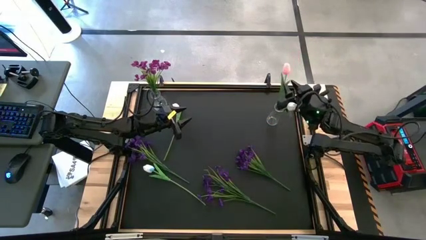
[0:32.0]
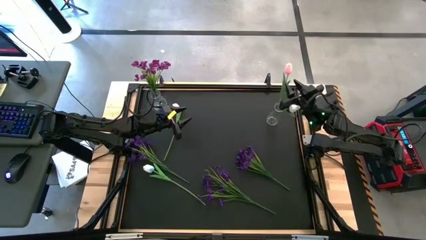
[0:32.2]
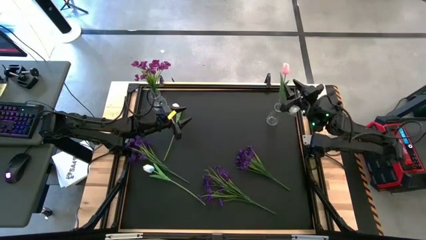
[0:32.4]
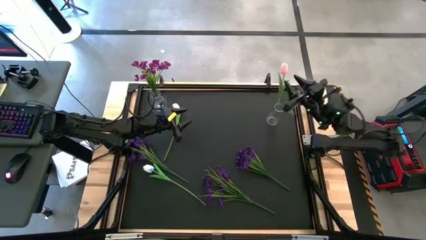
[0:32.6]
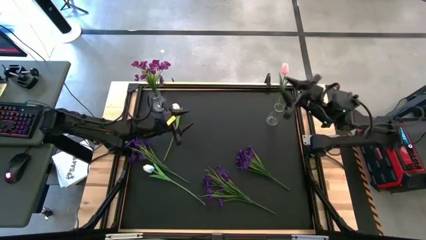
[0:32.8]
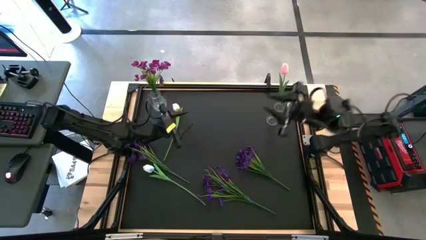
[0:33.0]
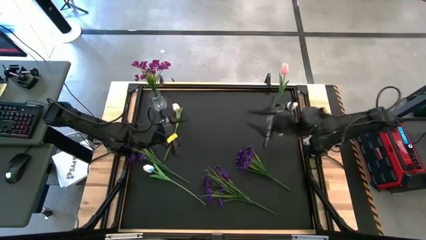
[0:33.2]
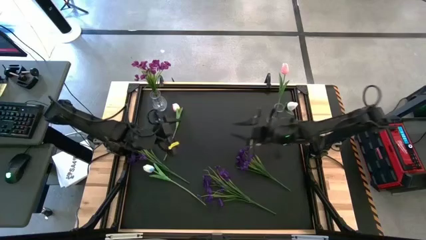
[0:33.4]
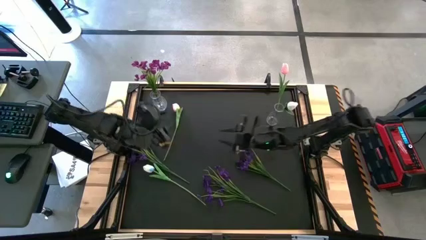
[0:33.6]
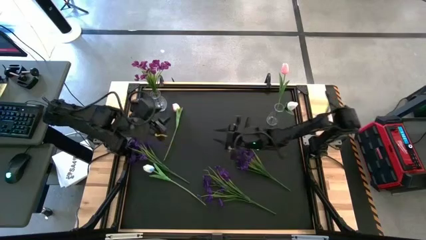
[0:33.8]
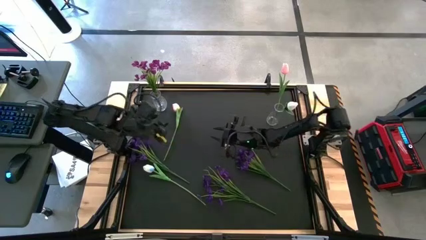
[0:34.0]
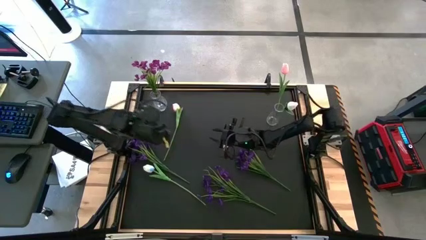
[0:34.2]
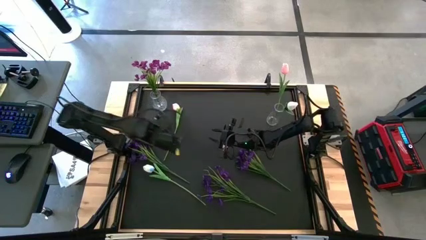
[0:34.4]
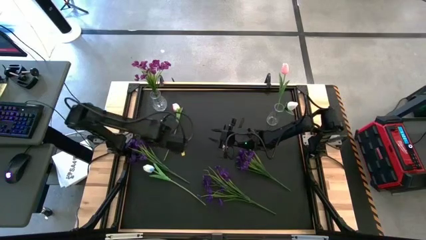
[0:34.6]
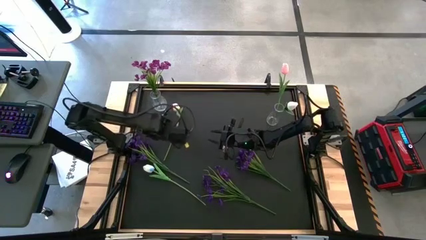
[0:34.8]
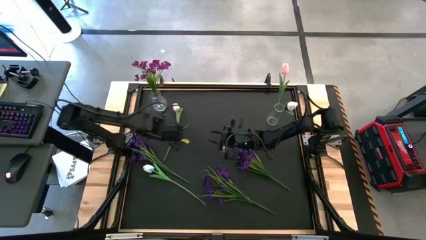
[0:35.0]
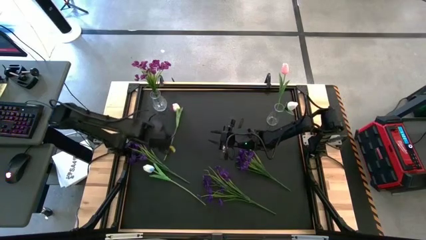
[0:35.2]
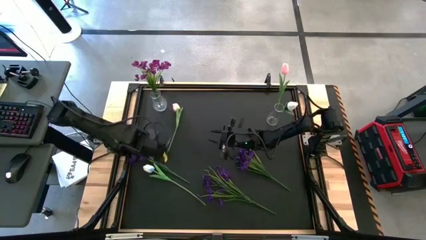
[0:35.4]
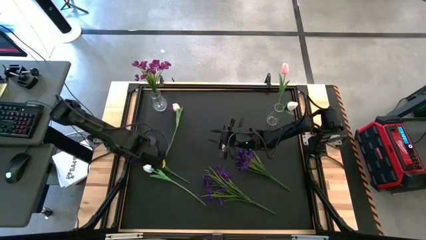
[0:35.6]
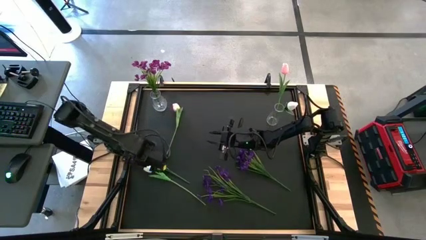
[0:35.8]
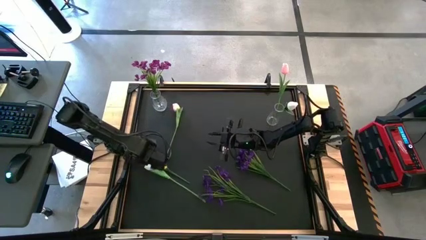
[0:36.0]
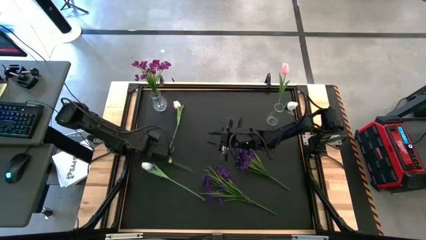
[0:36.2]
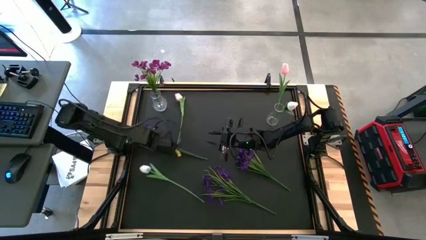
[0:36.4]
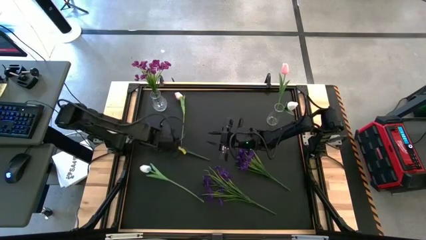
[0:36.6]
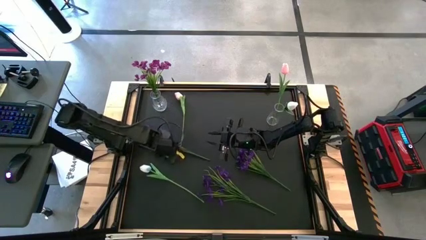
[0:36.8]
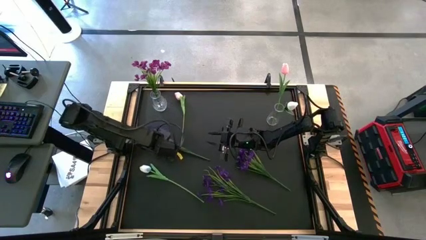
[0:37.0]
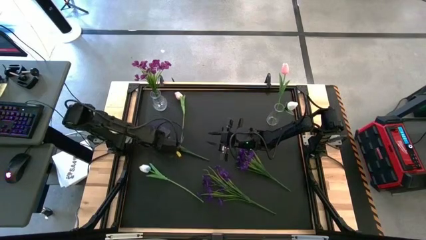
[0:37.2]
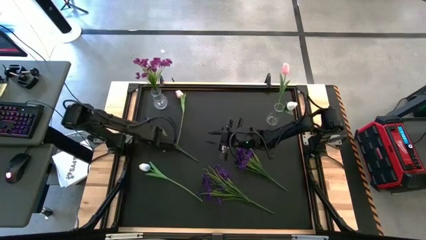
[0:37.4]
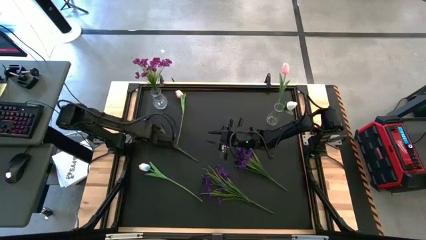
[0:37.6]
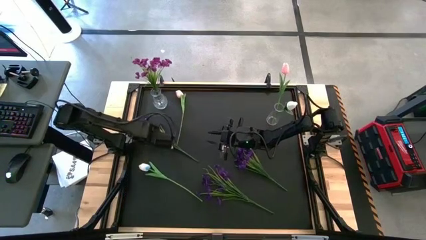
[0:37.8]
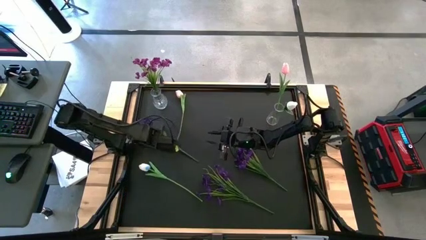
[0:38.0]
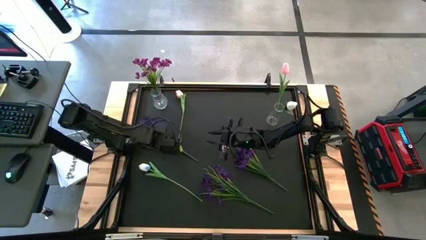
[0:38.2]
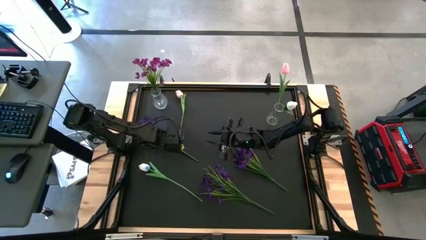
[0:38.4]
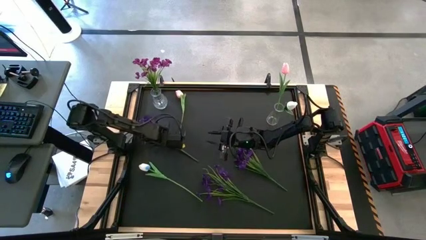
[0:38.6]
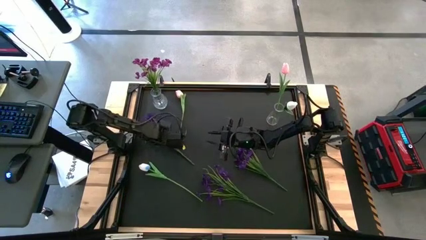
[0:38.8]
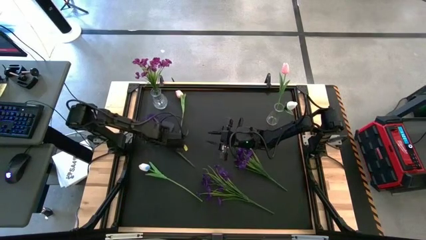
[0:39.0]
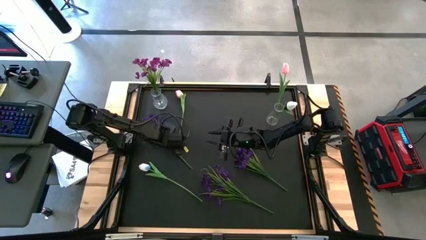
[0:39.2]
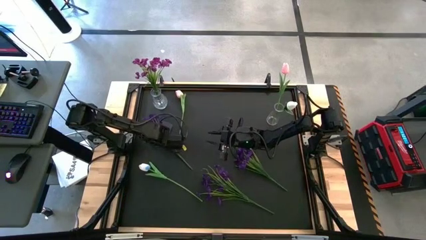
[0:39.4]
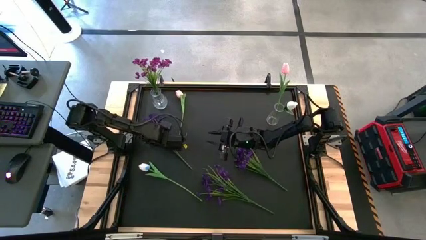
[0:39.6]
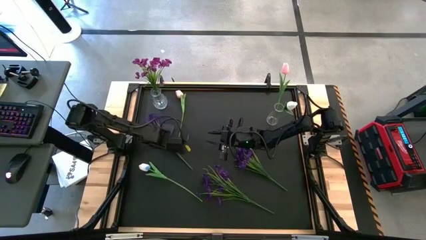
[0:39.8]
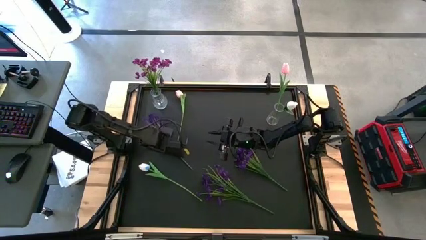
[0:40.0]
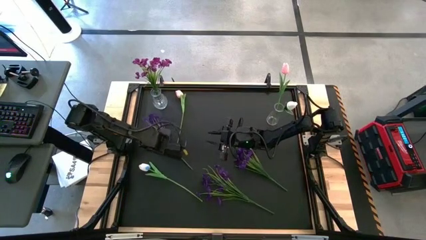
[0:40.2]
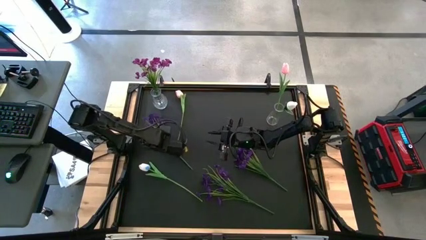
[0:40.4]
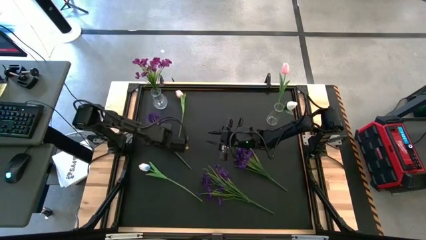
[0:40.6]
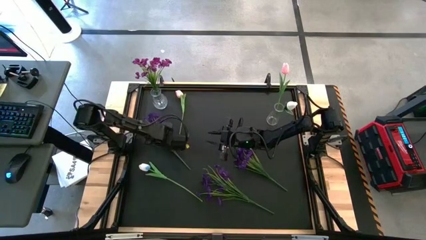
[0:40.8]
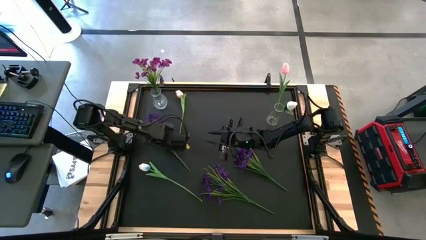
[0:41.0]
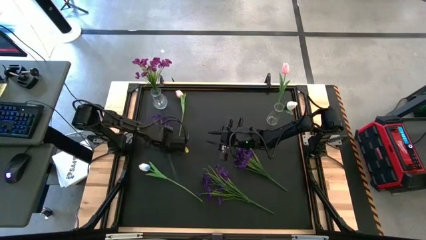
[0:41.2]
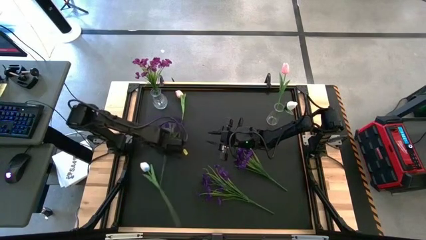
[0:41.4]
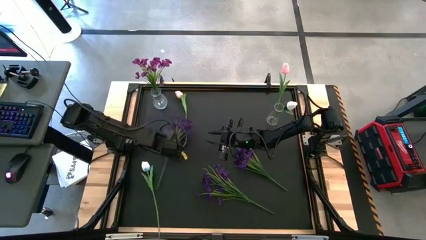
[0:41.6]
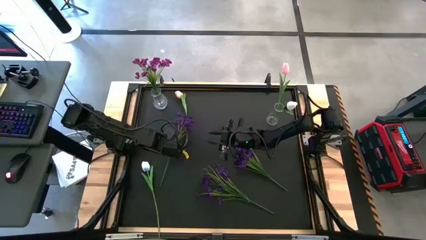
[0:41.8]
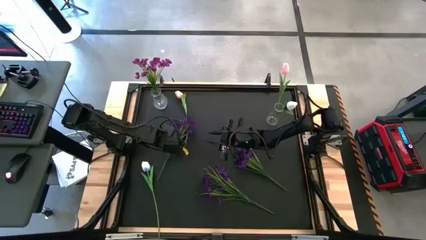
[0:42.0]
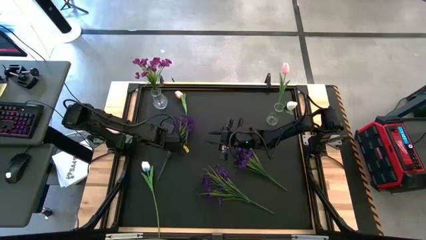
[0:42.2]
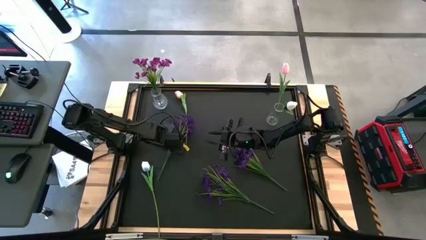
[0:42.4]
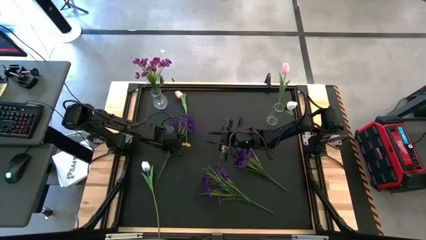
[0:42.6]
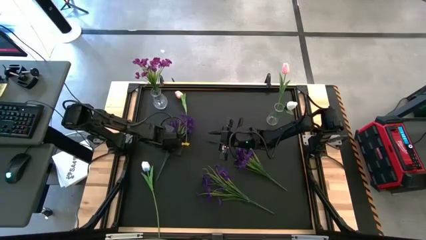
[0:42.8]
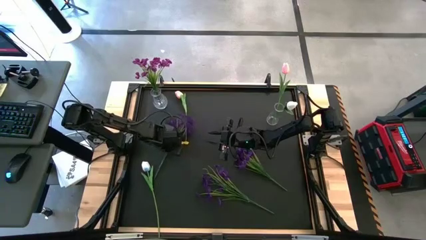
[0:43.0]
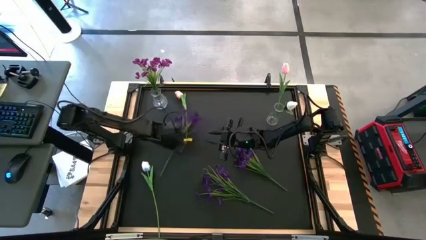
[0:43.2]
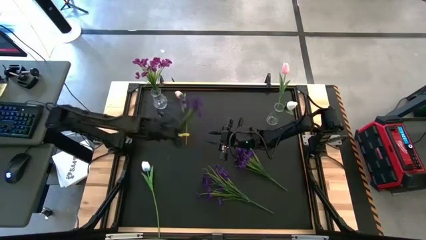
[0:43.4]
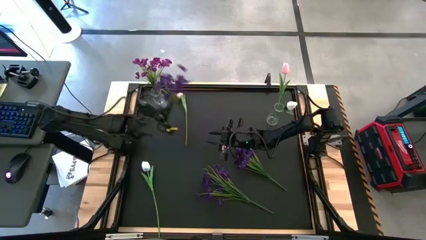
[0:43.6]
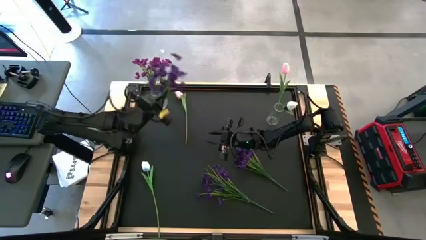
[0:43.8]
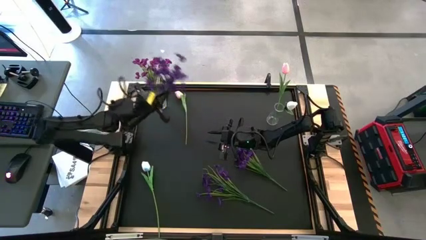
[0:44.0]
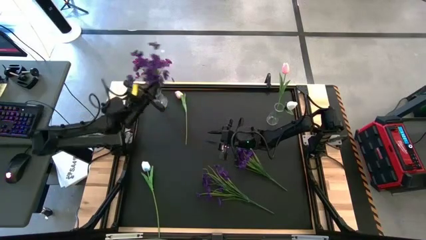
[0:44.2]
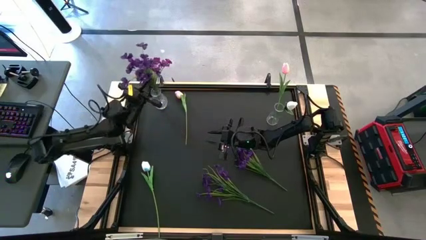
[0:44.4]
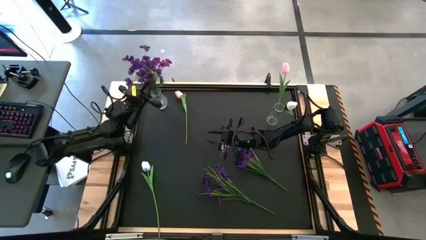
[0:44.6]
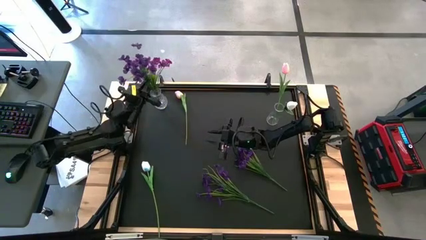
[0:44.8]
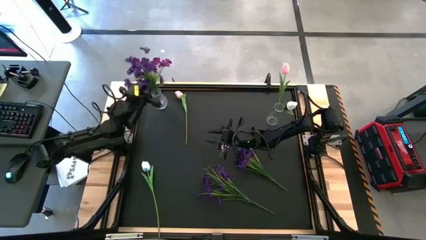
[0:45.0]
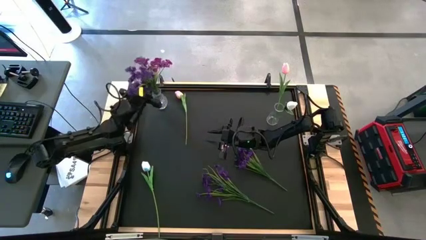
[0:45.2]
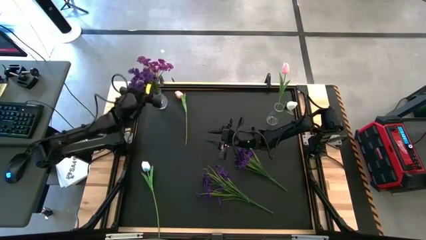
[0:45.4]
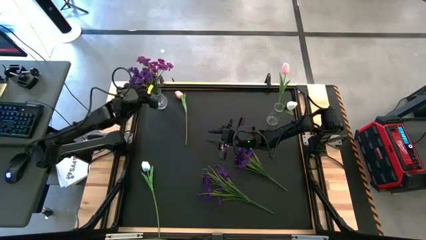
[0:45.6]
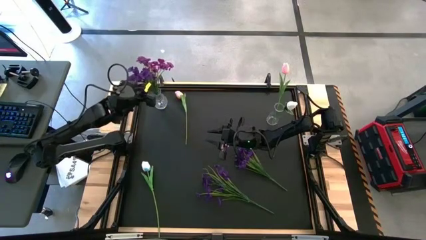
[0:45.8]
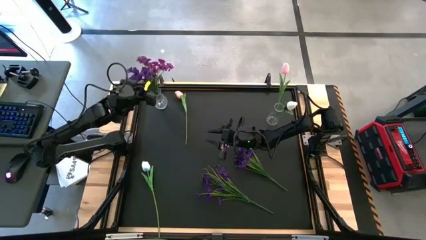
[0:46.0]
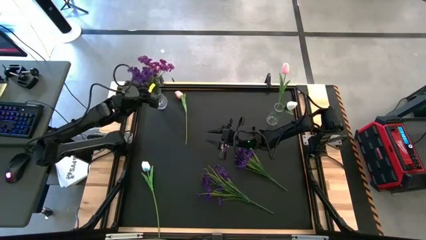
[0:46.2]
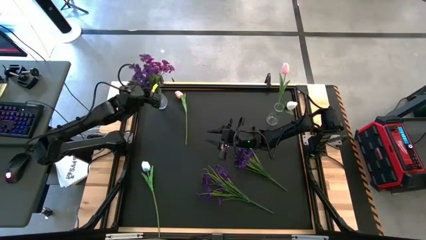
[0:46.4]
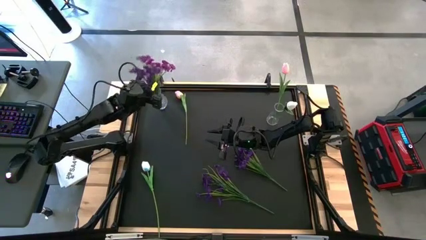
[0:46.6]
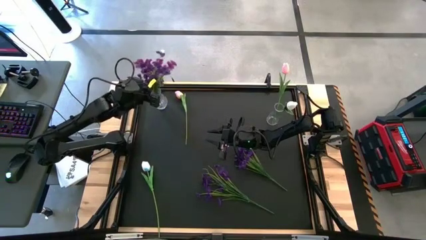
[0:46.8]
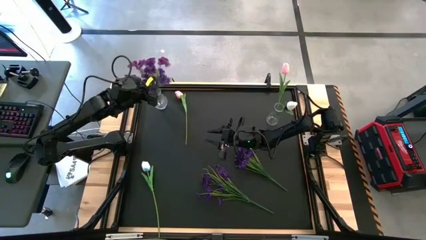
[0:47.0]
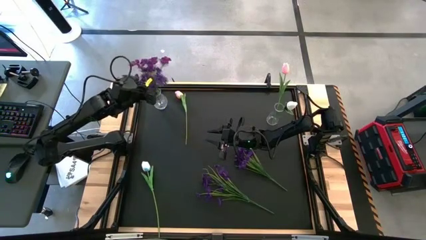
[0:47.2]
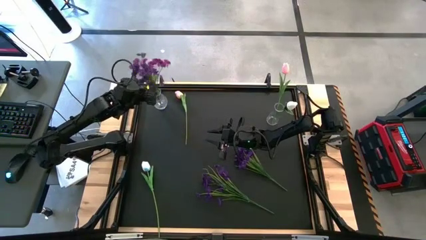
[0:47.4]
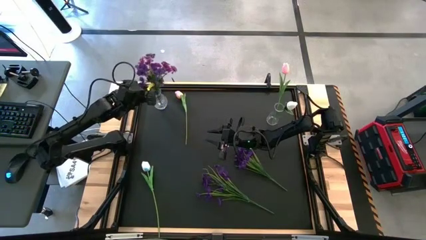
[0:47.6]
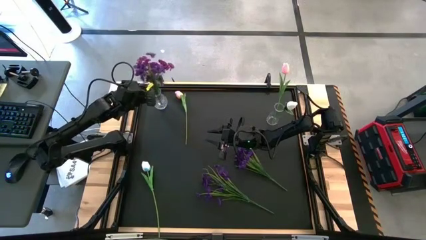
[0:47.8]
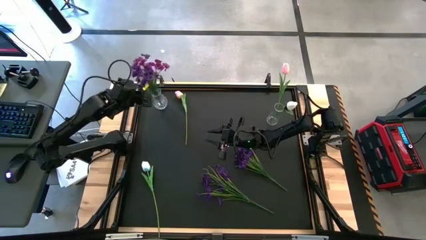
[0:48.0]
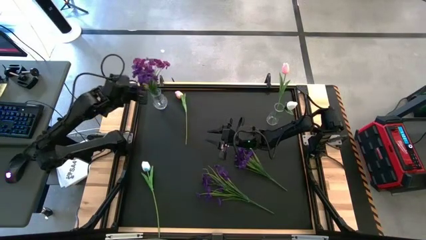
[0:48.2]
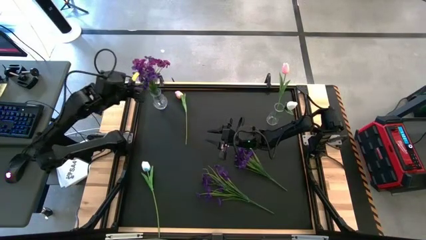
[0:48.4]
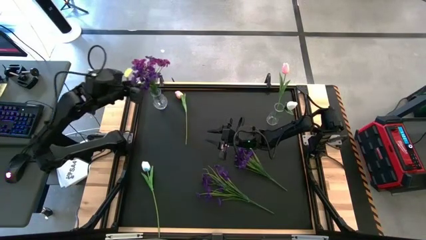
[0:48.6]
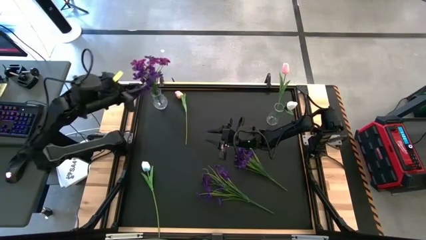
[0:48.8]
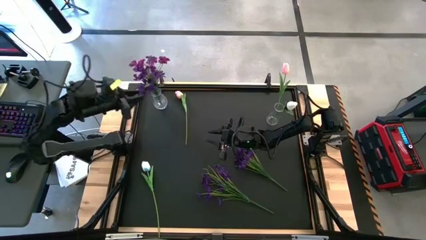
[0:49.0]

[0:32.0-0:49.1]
Task: Sort flowers into vase by color
Put the top left purple flower into the left transparent vase
